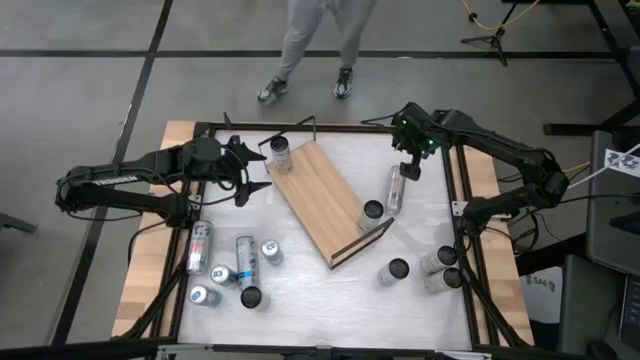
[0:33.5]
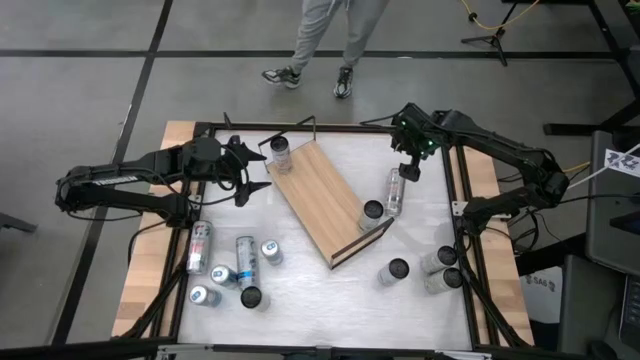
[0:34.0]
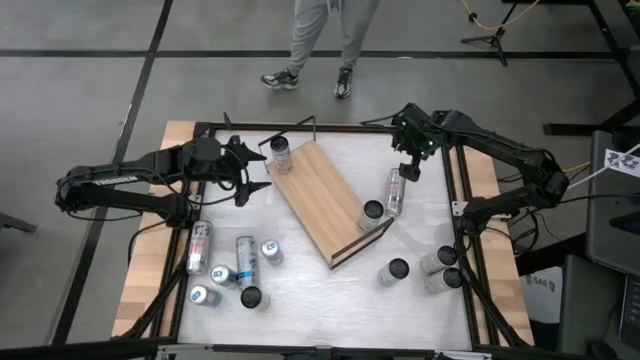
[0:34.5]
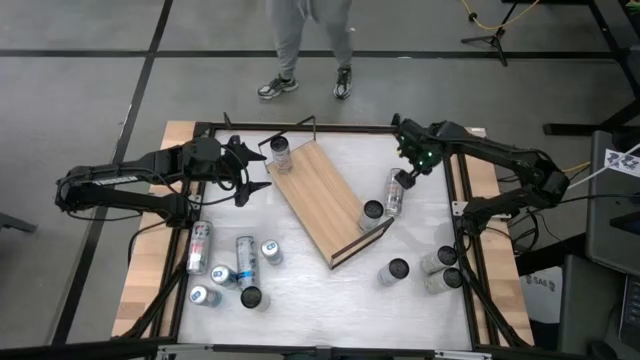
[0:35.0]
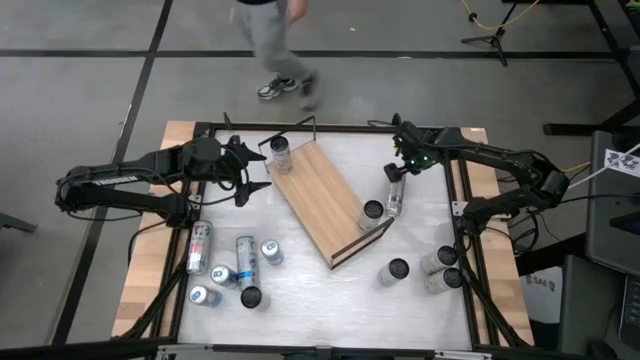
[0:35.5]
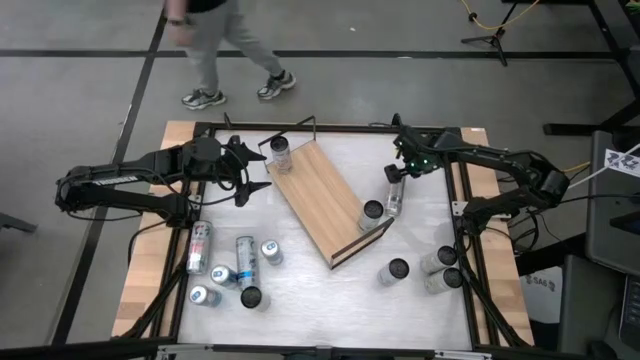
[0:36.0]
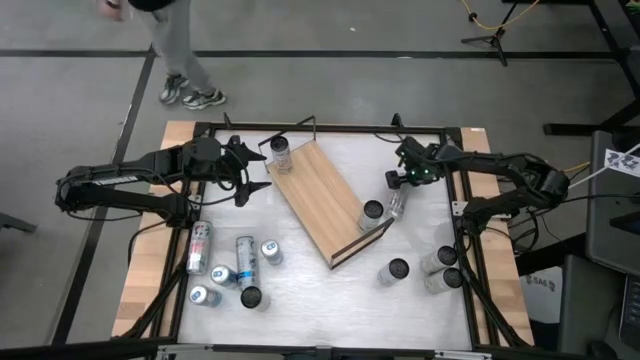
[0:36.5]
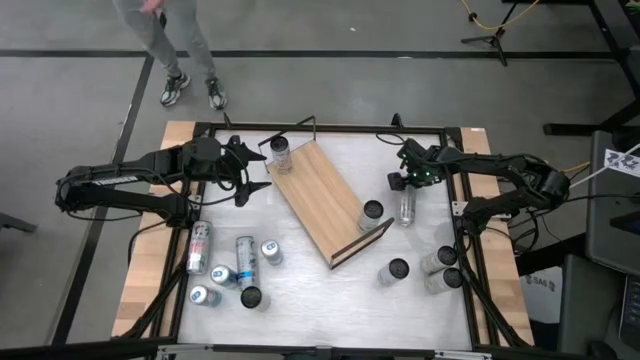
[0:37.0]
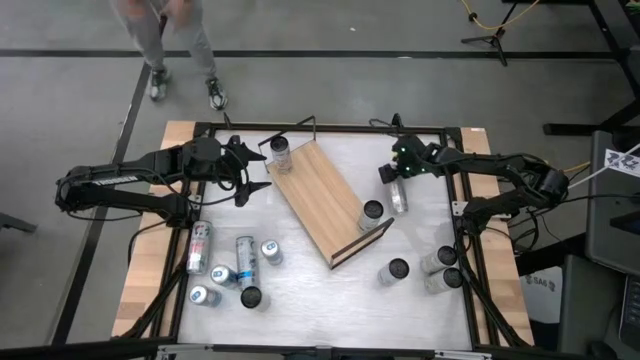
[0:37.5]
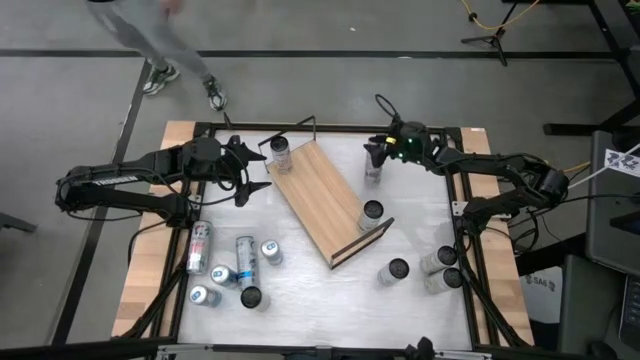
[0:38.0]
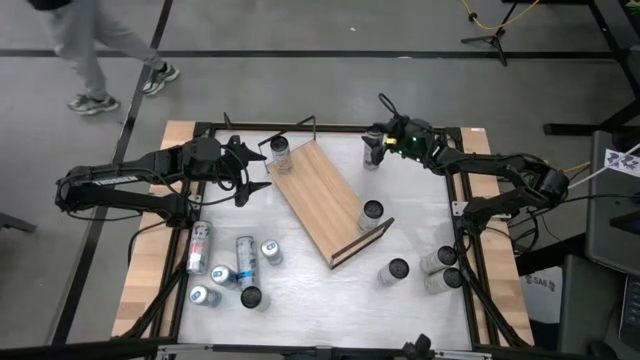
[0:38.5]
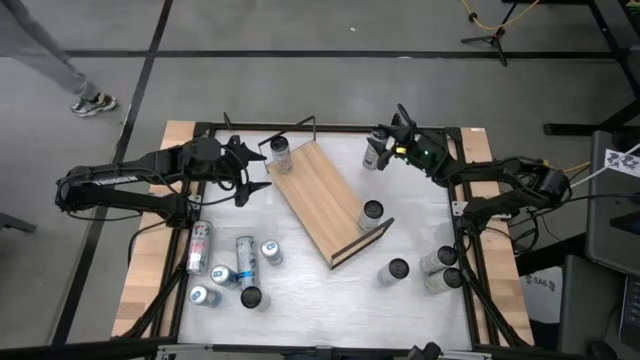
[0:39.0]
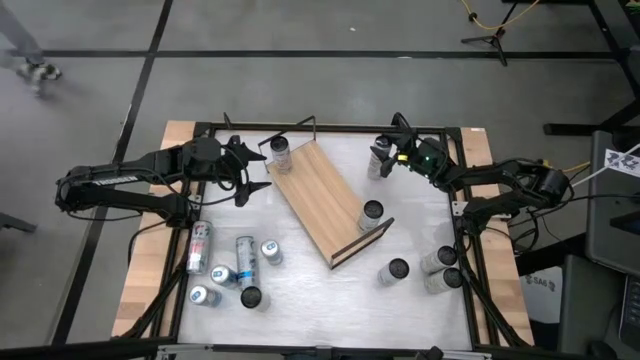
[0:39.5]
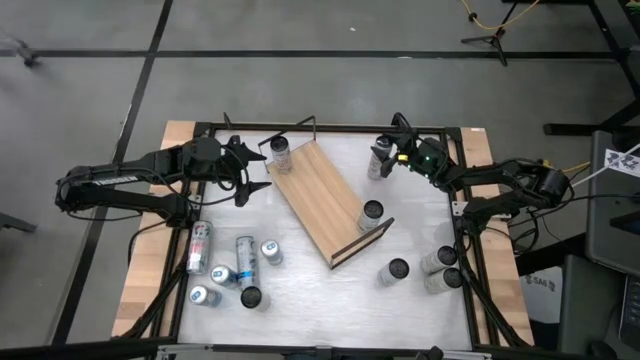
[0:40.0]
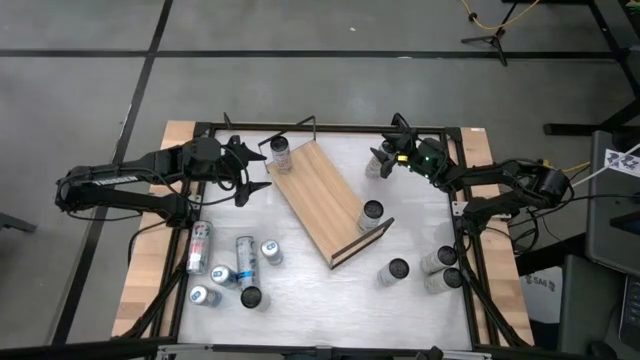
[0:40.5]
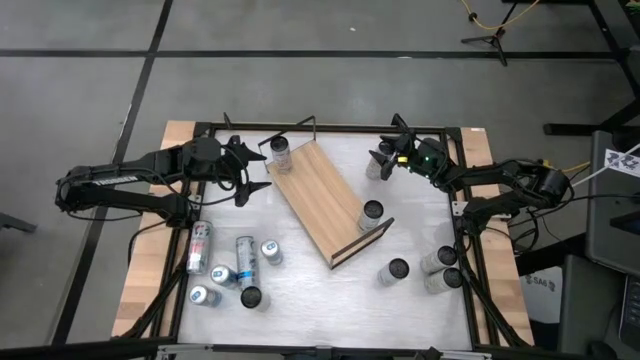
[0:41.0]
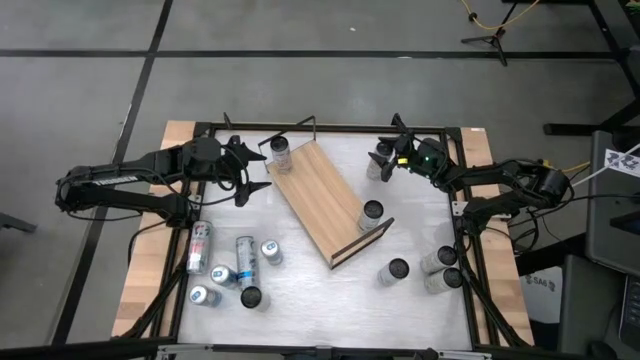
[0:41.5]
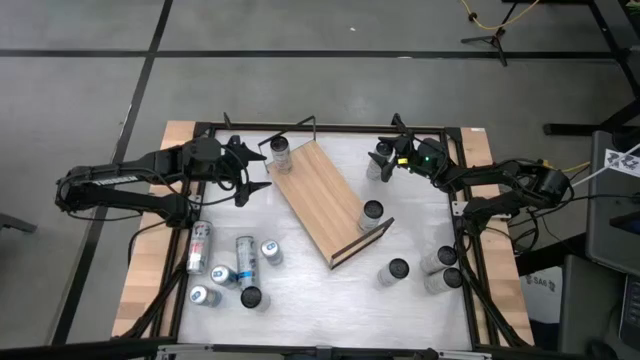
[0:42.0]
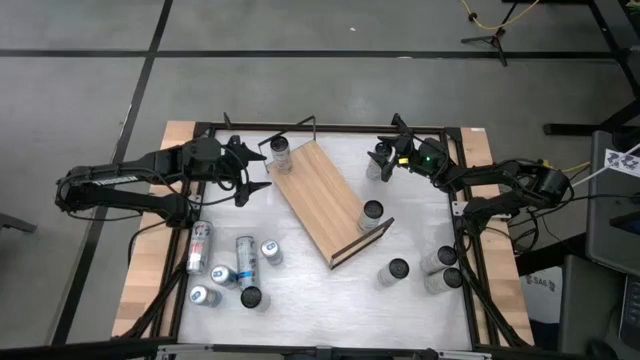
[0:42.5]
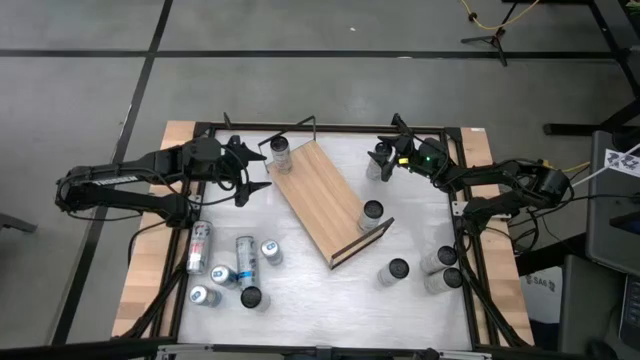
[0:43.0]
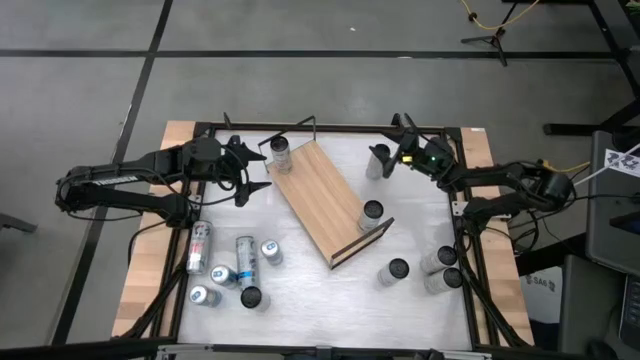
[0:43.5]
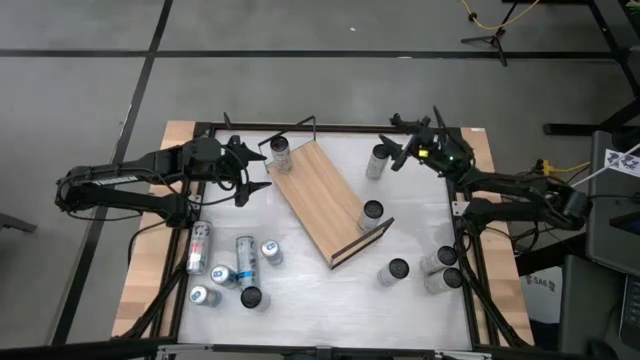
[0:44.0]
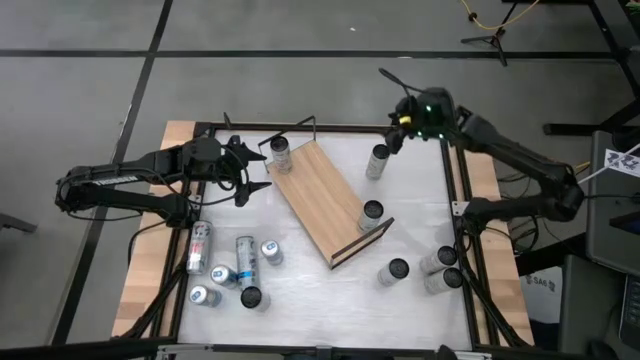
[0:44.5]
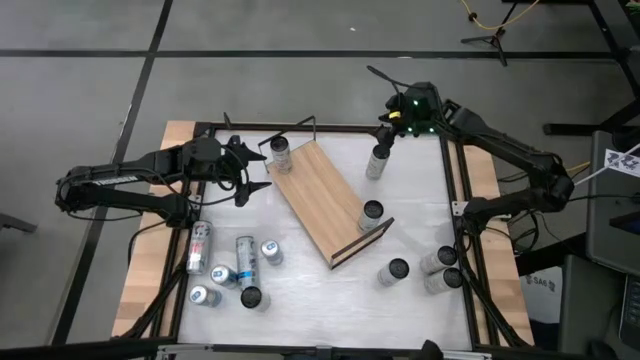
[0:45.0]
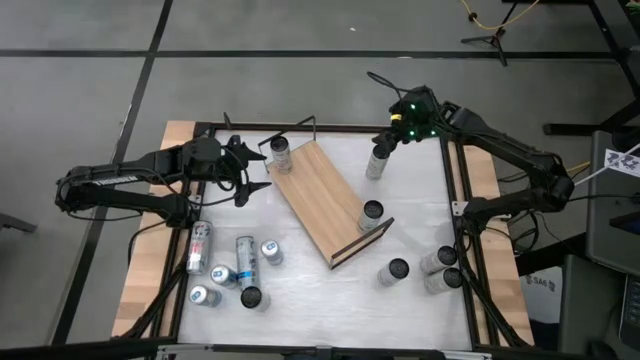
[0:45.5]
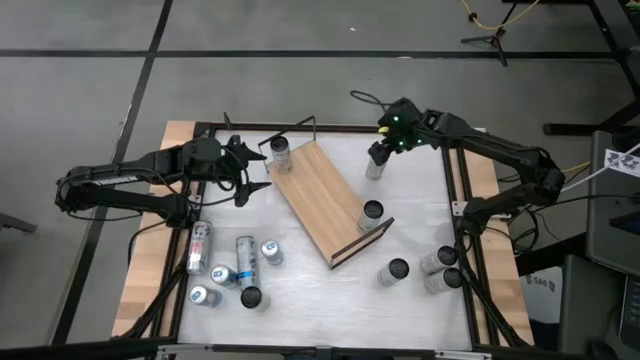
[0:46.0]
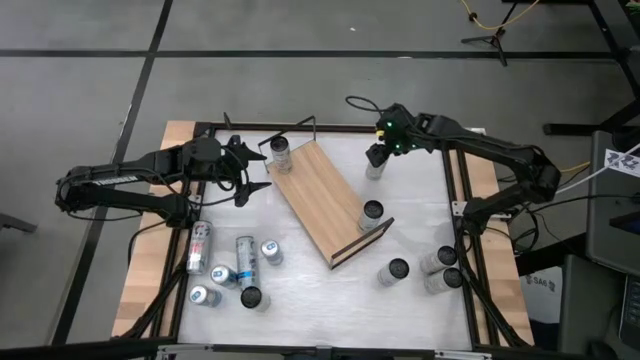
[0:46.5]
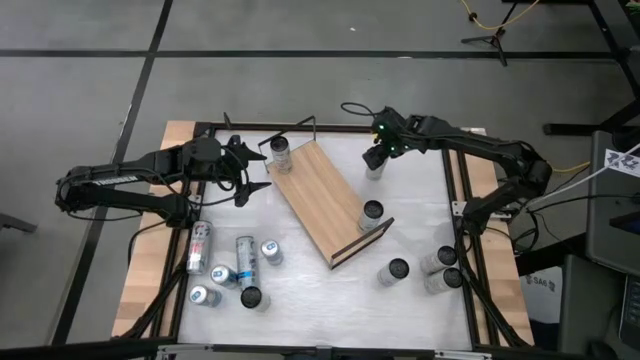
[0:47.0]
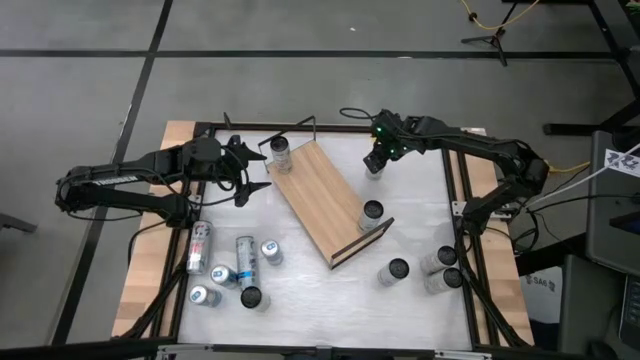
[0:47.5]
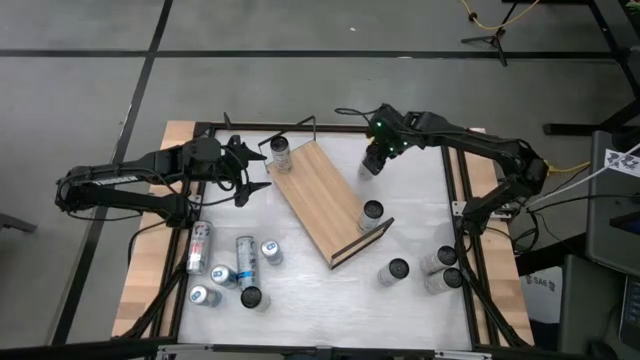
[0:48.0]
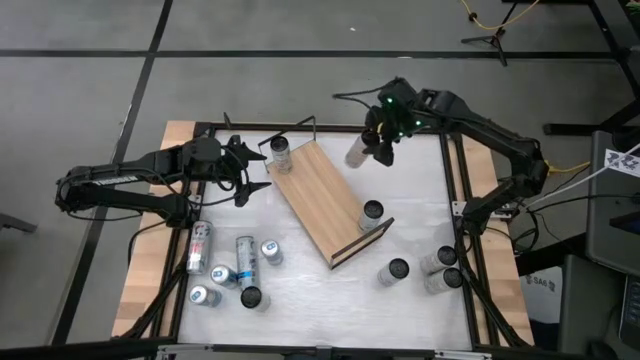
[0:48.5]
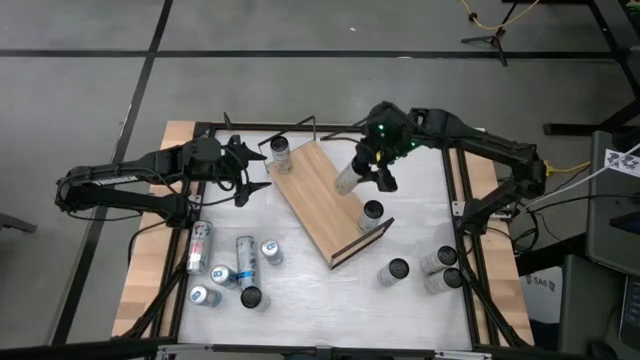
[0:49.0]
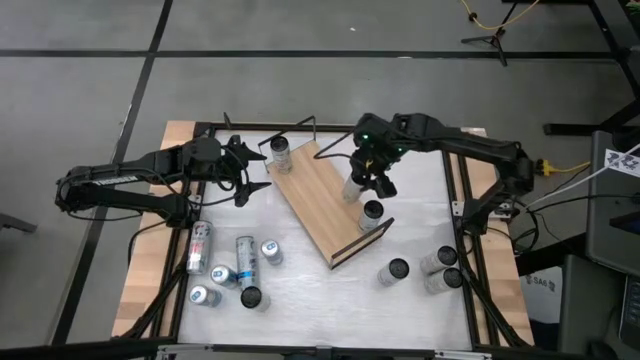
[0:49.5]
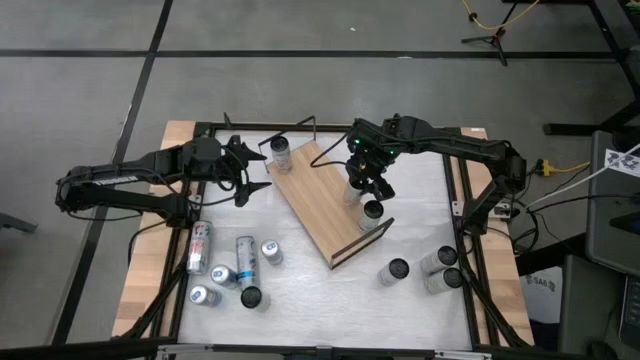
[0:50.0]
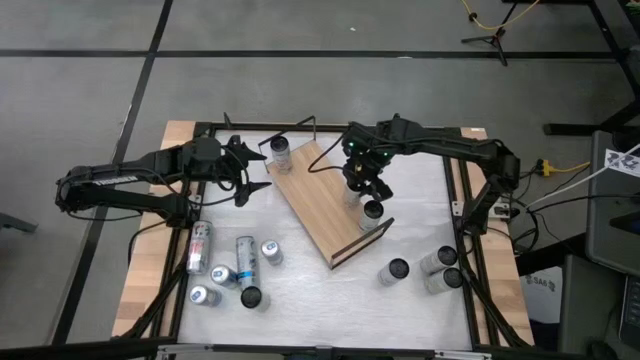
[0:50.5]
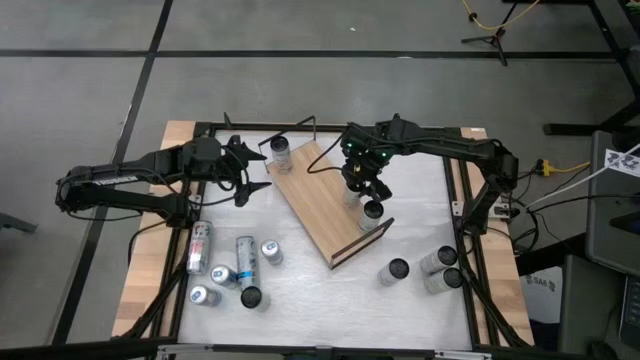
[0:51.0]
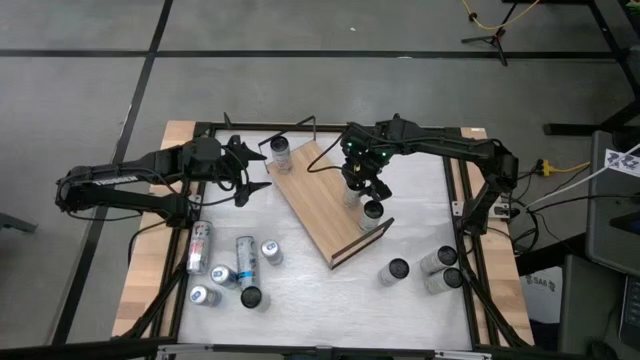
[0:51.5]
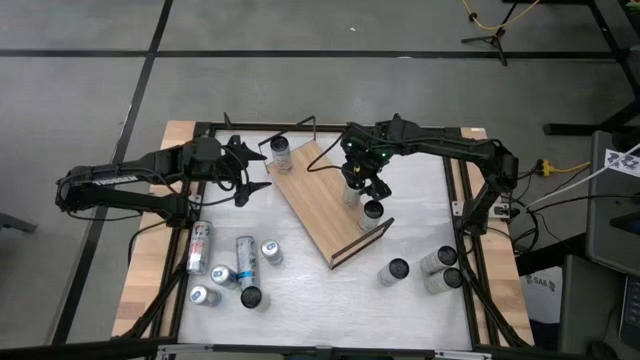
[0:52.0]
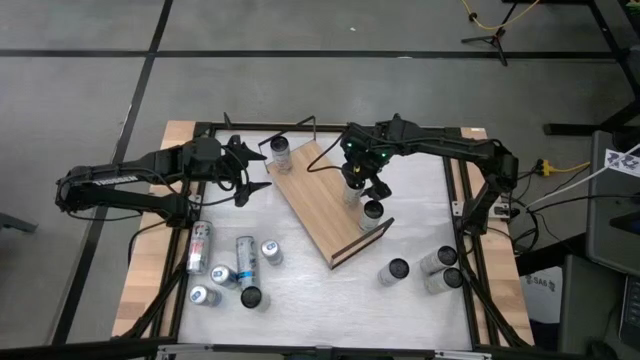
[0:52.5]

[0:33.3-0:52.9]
Task: Place canned beverage on shelf
Put the top white-orange soda can on the shelf
